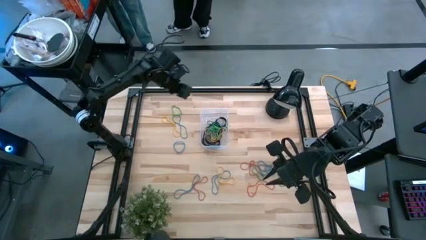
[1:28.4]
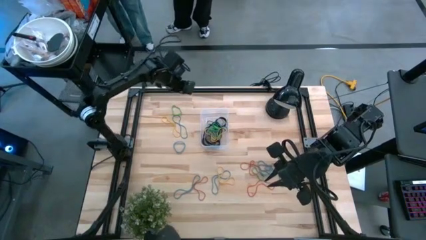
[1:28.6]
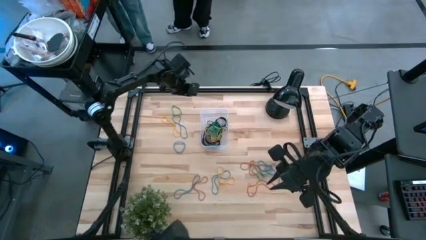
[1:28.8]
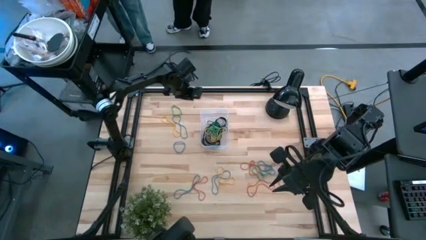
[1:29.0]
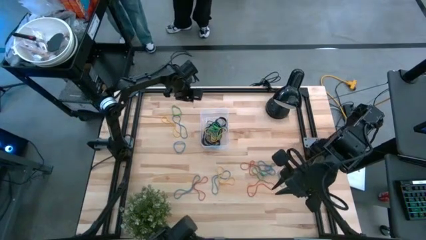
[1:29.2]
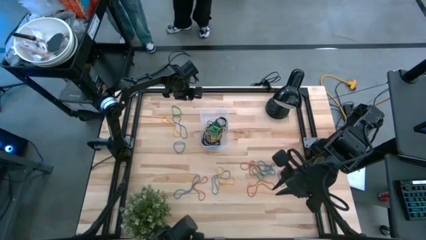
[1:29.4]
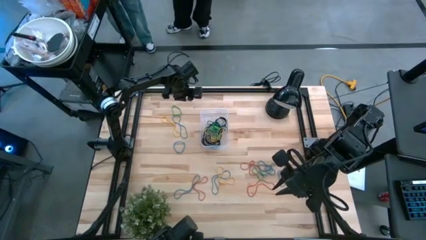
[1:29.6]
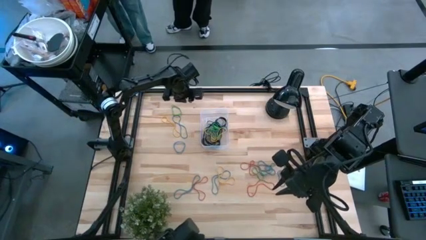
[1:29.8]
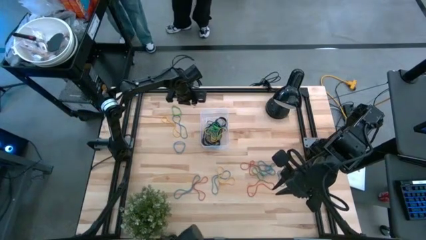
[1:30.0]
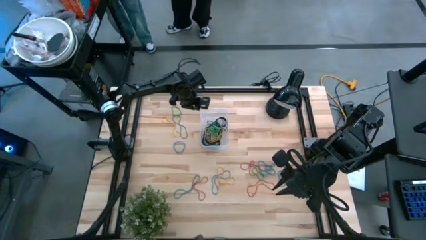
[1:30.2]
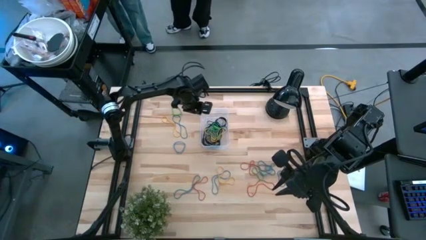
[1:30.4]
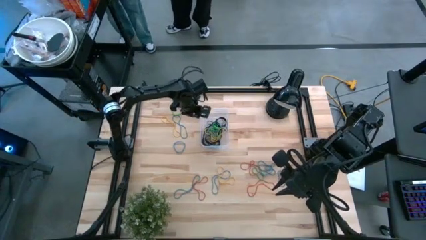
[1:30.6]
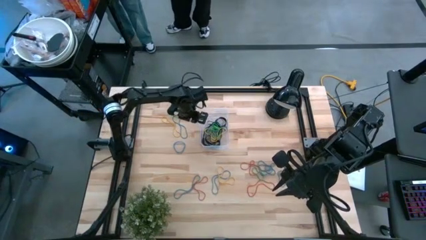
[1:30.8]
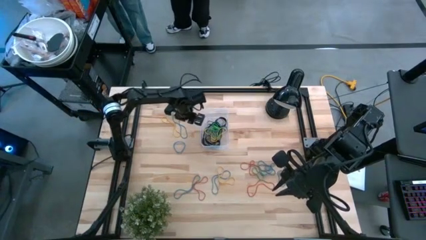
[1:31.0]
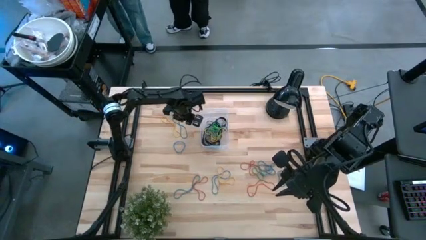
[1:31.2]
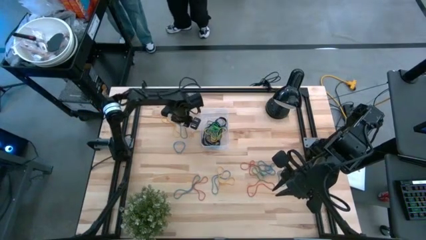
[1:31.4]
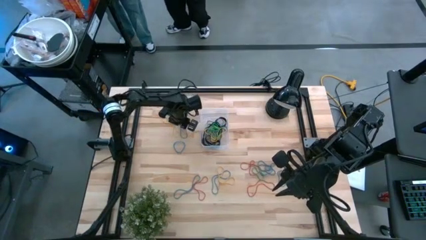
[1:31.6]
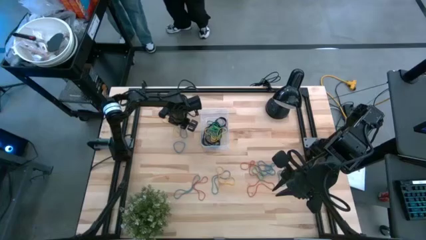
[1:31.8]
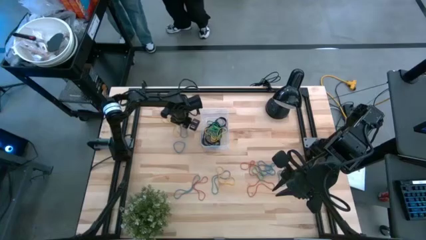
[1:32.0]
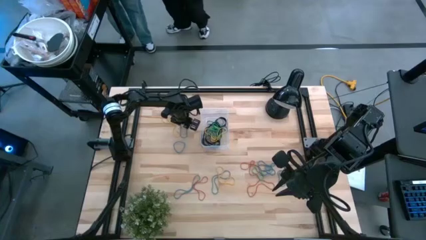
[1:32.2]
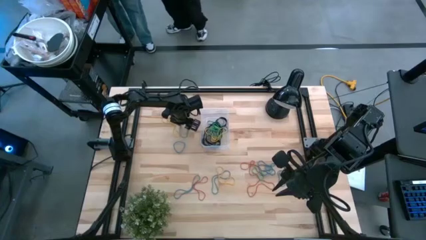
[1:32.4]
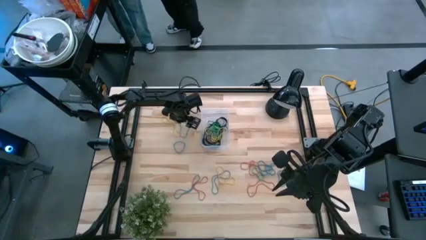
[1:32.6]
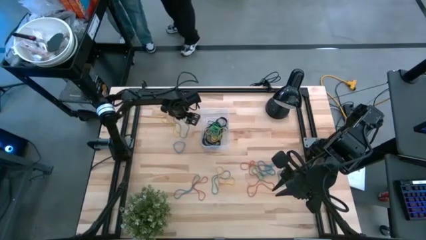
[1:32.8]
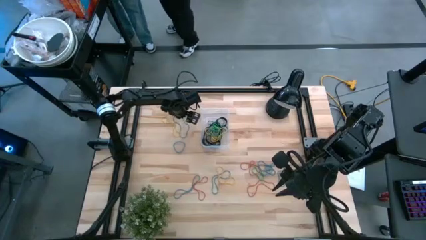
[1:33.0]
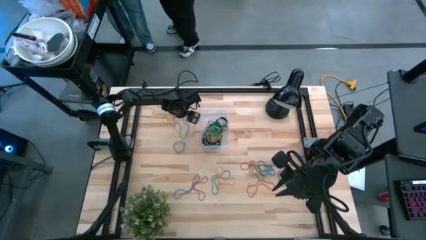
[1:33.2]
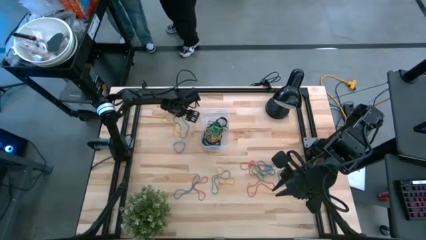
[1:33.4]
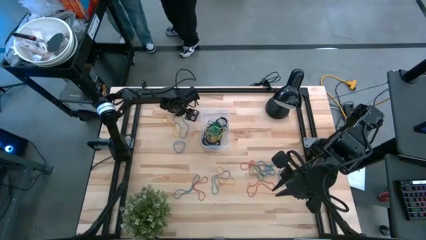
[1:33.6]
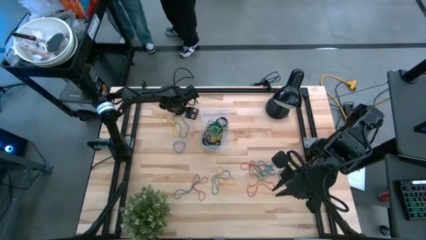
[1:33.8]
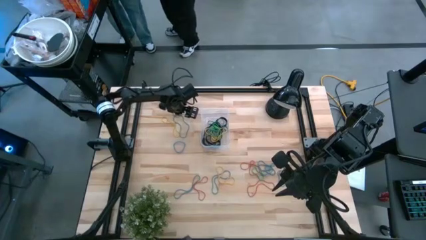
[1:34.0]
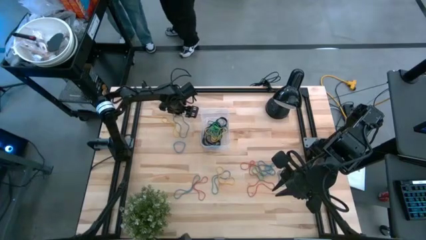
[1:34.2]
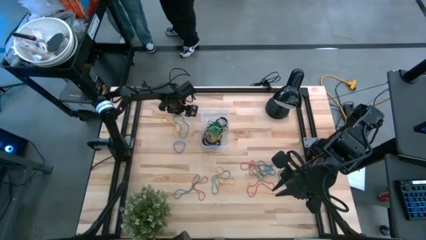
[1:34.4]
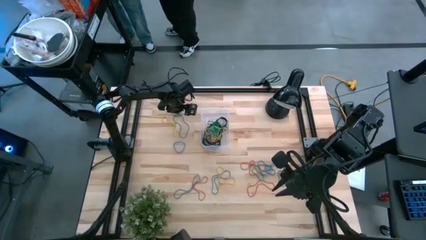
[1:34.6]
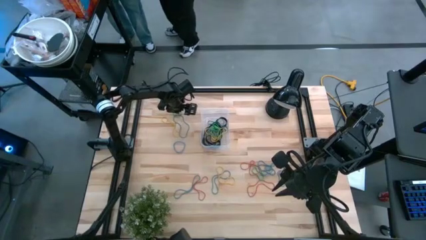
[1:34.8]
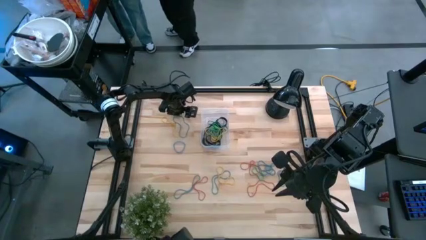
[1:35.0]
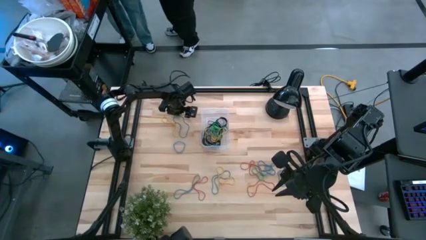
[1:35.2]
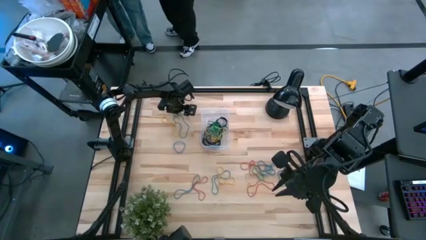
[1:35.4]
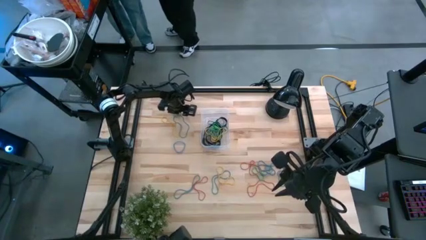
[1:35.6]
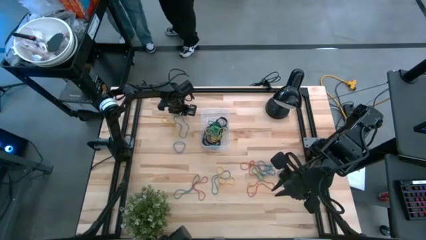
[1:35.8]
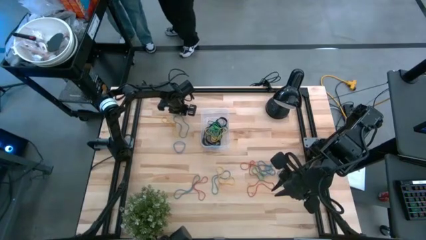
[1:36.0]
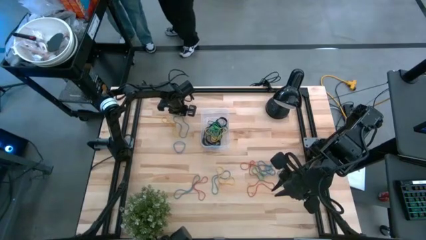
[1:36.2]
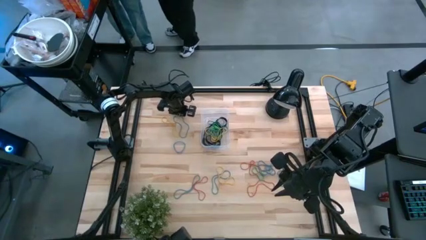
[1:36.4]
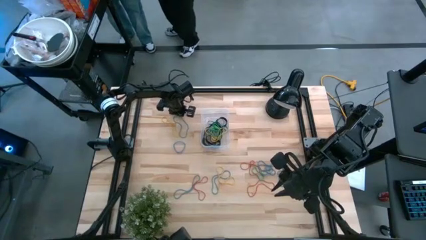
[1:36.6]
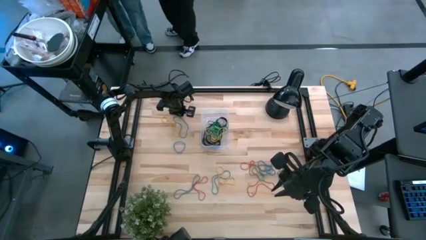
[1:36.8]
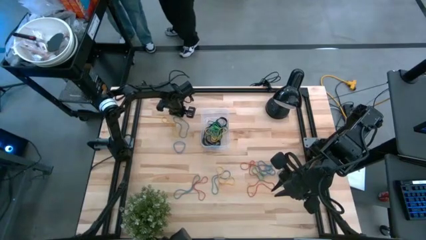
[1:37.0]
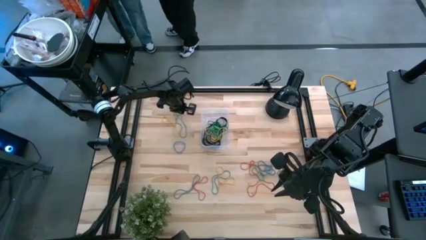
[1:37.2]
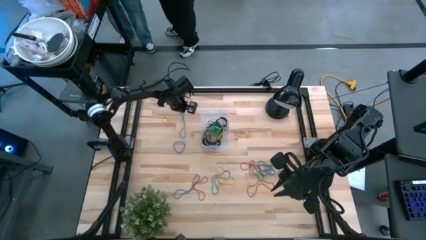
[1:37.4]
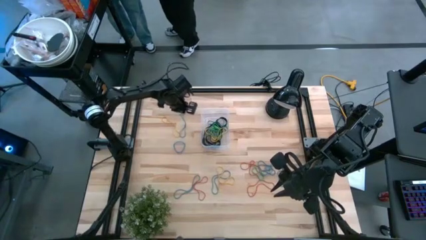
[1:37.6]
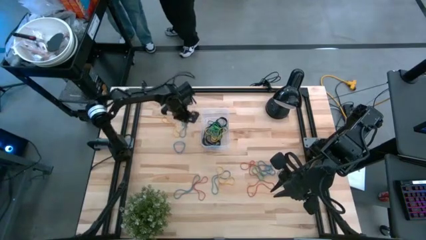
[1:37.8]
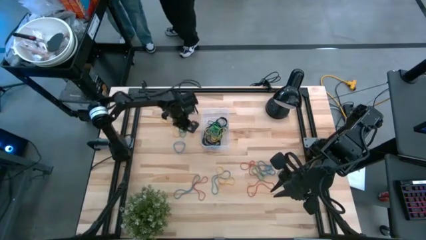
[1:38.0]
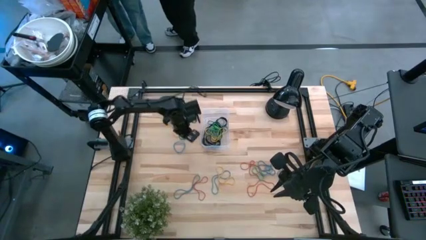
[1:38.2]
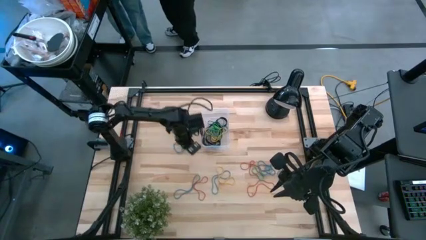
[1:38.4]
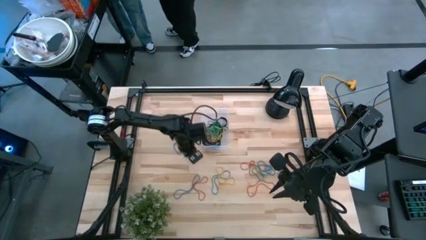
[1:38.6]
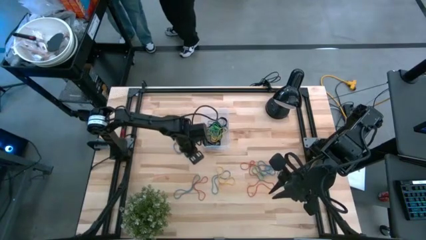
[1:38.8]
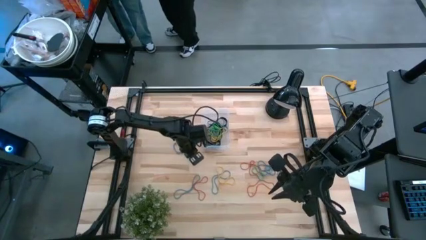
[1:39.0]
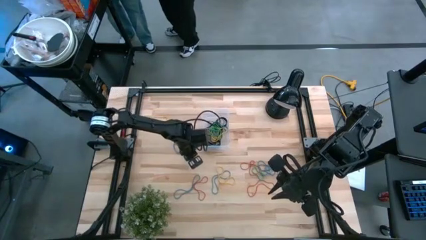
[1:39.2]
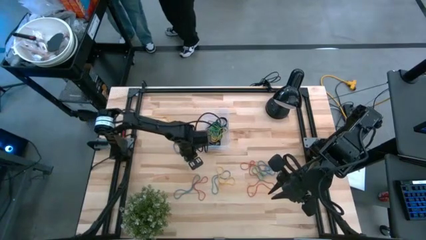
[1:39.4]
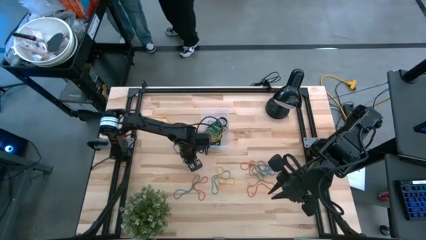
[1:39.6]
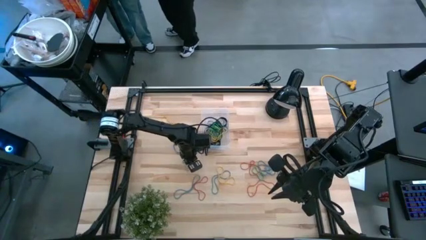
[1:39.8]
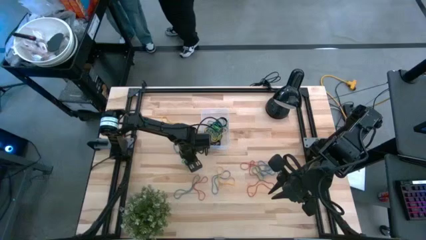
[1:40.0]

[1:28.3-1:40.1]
Task: Pick and place rubber bands into bin
Put the green rubber band into the transparent bin

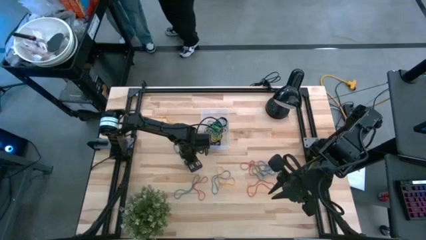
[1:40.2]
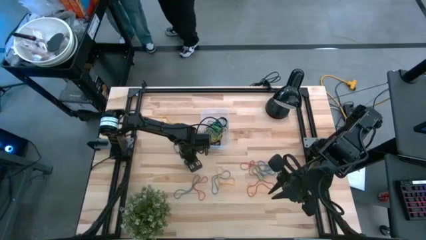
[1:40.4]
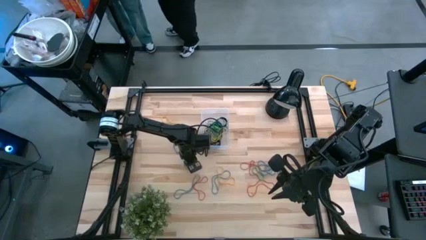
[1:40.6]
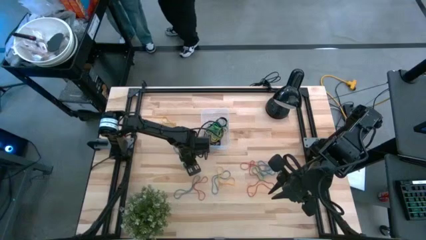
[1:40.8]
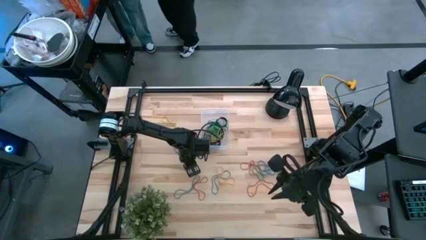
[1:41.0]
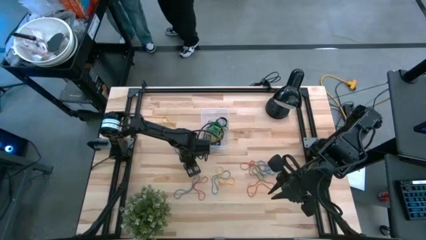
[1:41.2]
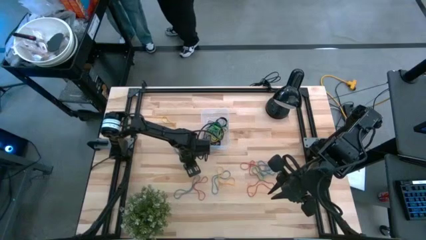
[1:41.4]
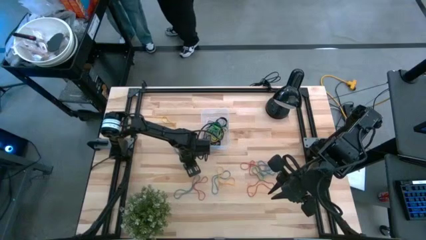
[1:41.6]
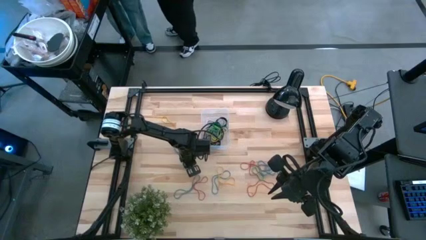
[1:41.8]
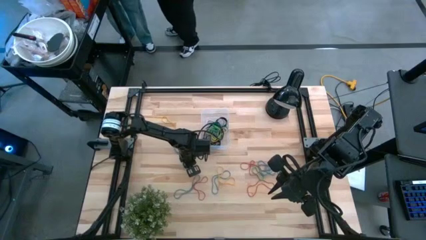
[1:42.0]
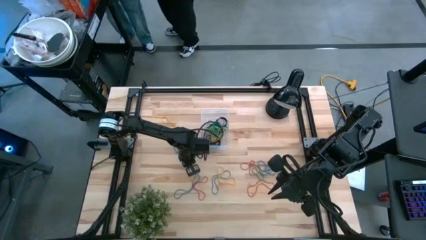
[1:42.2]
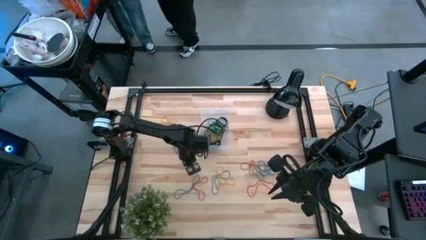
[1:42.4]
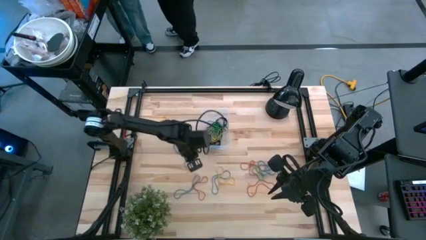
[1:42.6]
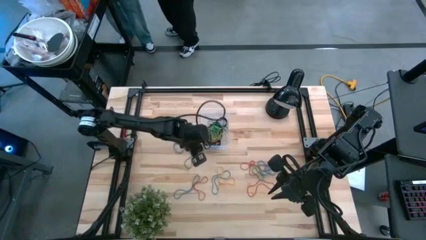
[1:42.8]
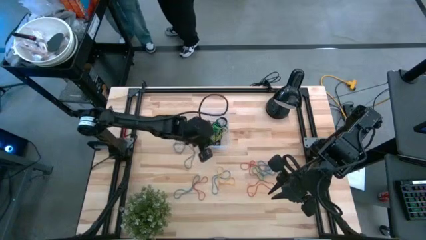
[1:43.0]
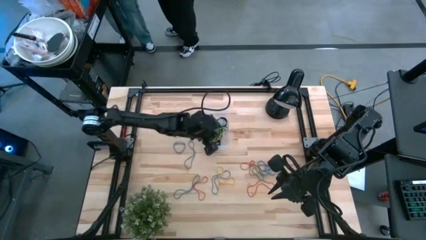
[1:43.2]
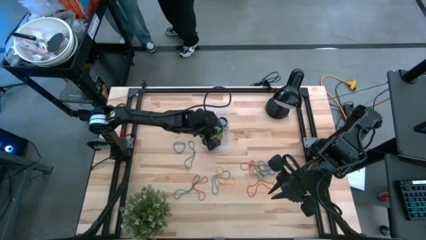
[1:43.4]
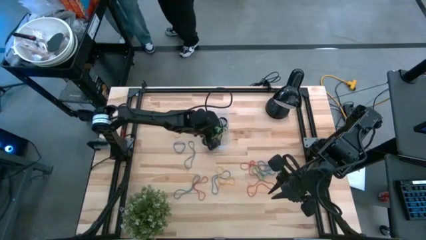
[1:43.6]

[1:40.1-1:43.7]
Put the green rubber band into the transparent bin
